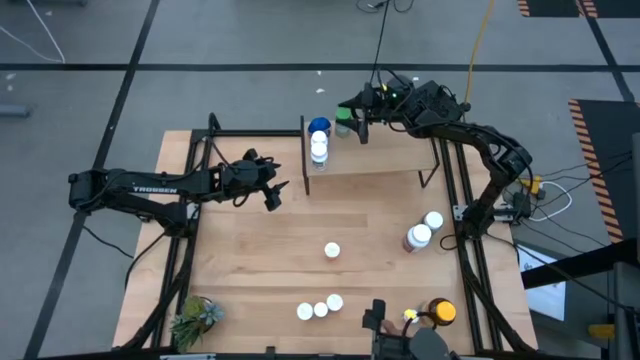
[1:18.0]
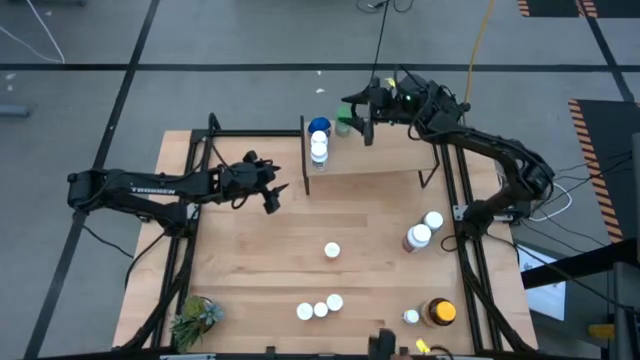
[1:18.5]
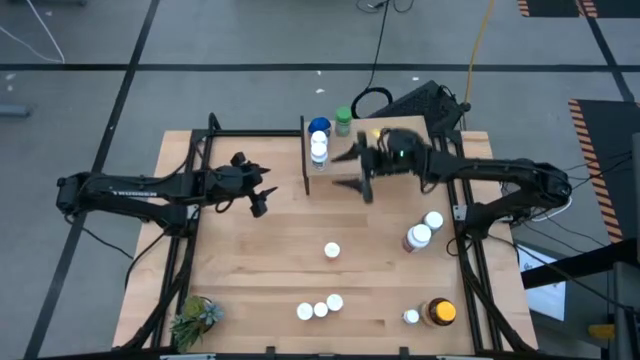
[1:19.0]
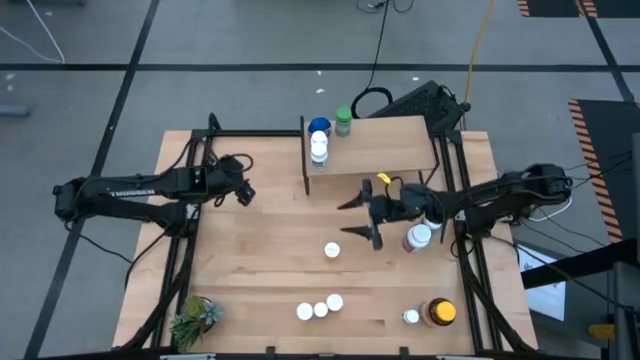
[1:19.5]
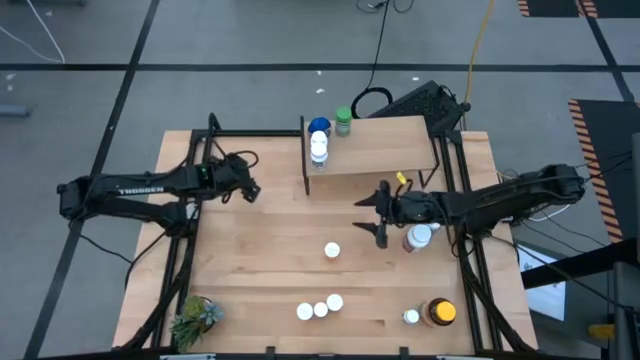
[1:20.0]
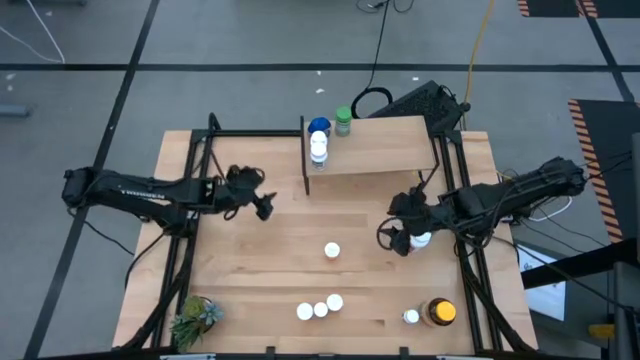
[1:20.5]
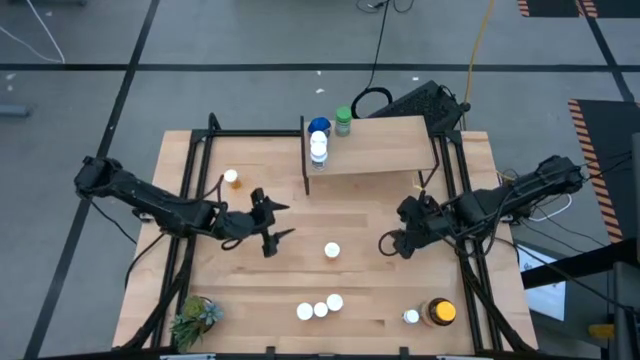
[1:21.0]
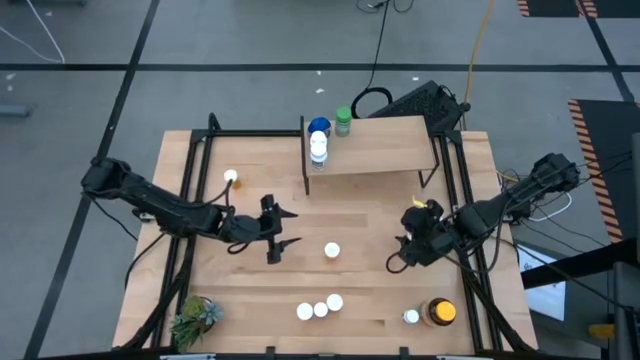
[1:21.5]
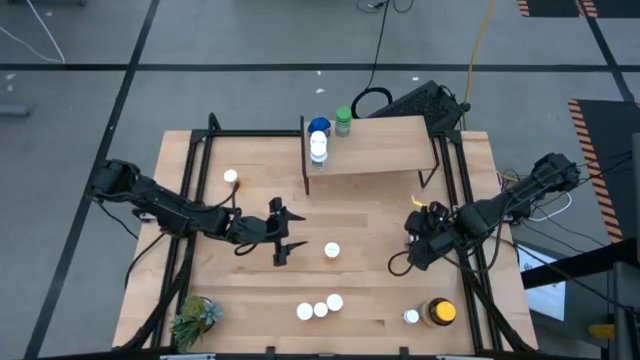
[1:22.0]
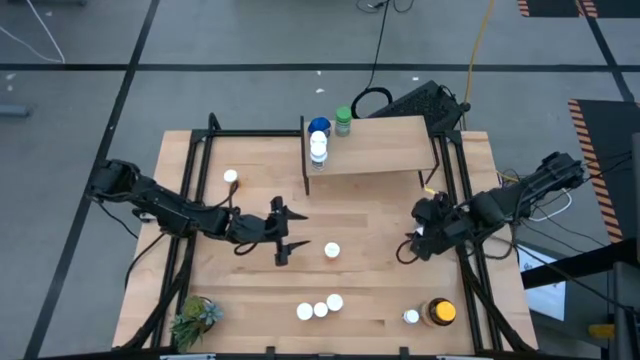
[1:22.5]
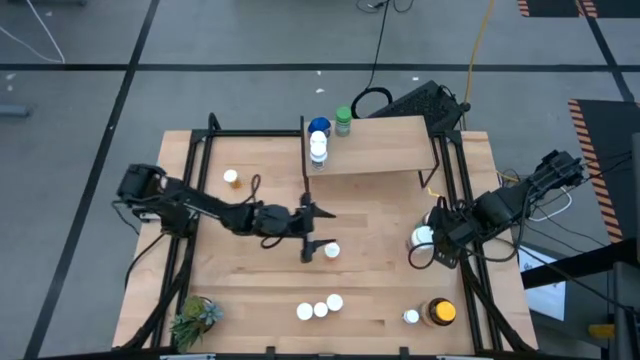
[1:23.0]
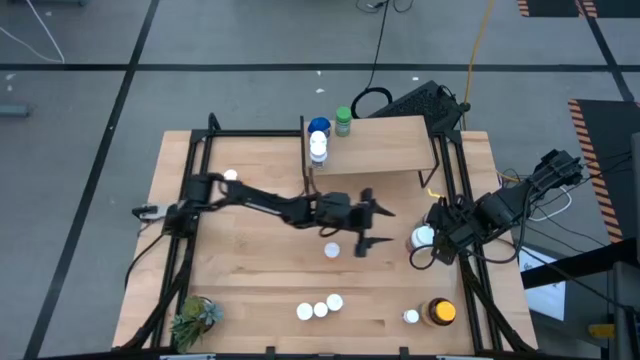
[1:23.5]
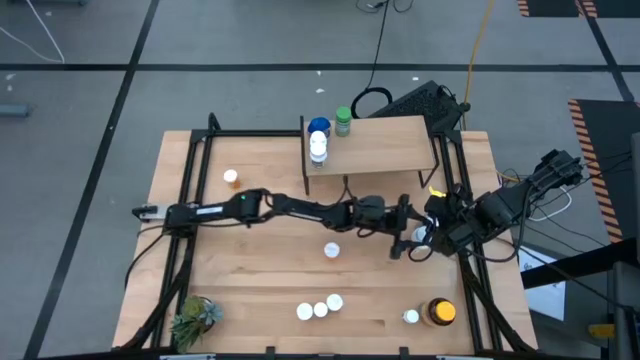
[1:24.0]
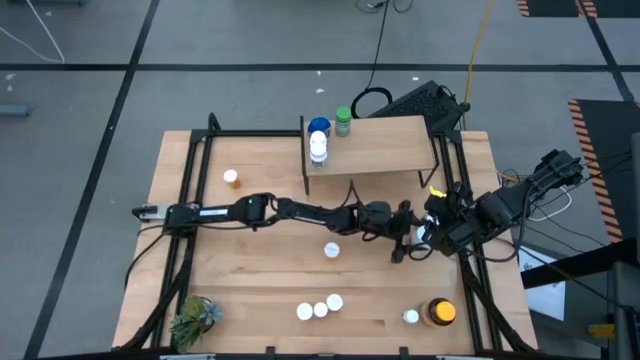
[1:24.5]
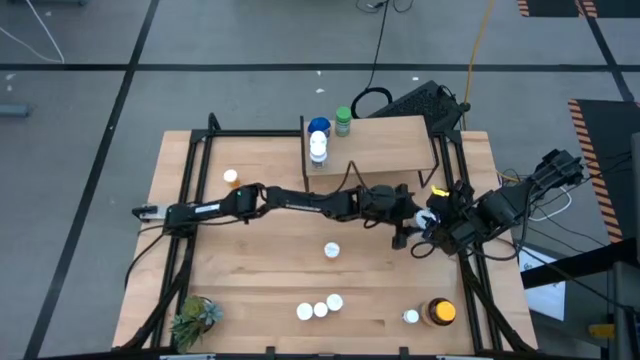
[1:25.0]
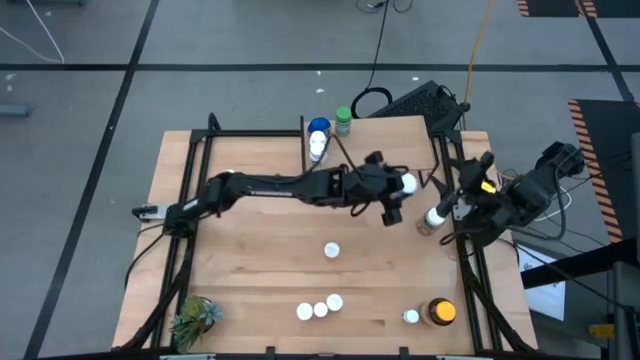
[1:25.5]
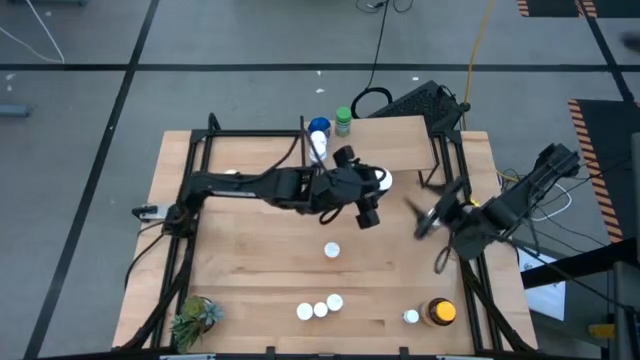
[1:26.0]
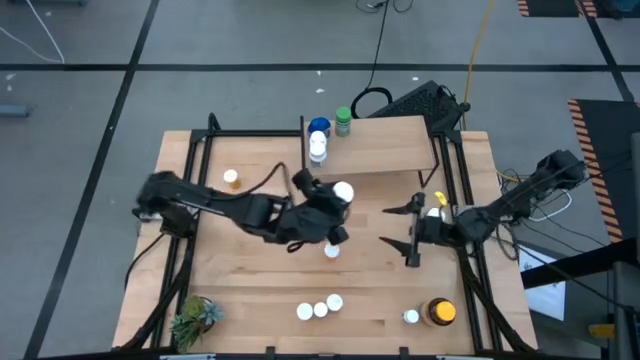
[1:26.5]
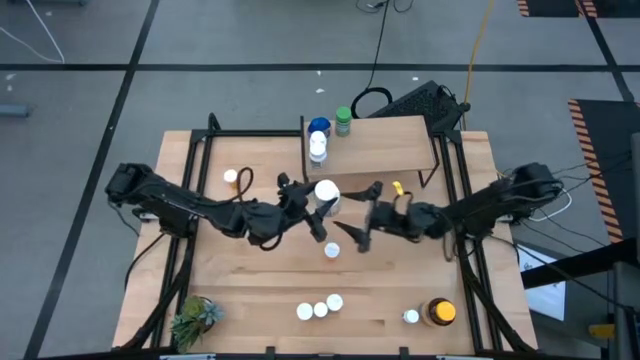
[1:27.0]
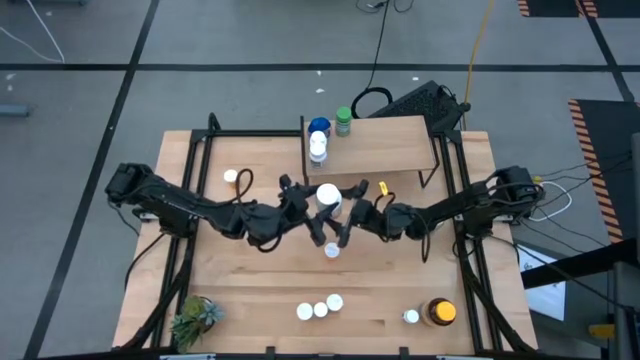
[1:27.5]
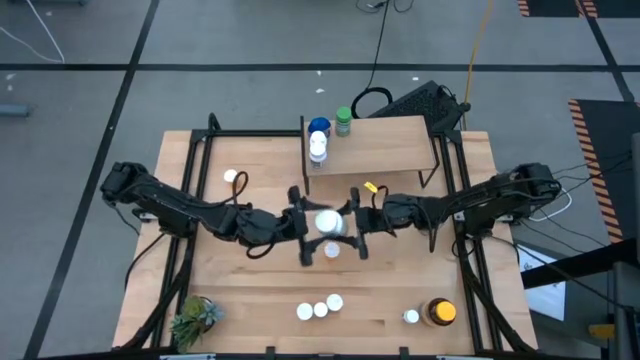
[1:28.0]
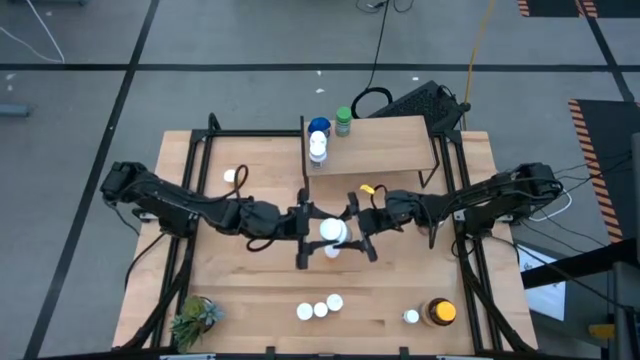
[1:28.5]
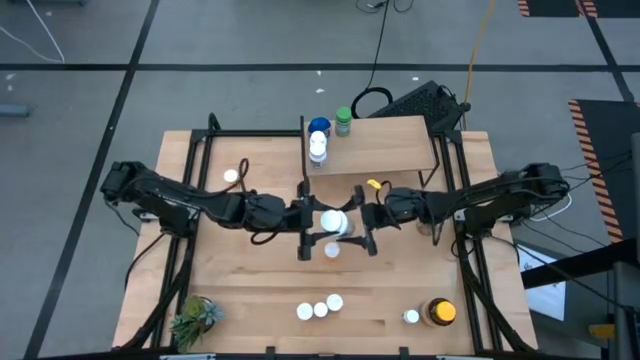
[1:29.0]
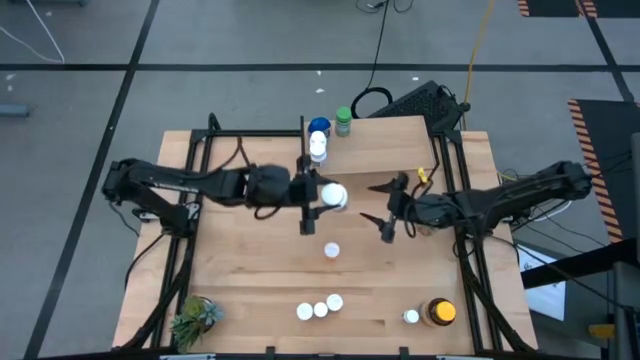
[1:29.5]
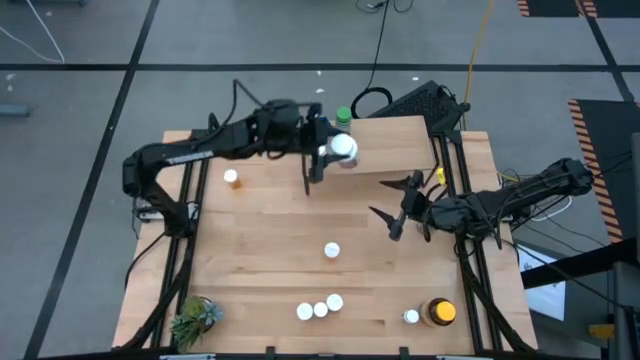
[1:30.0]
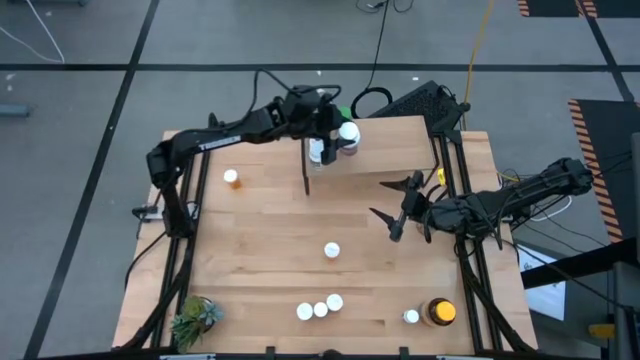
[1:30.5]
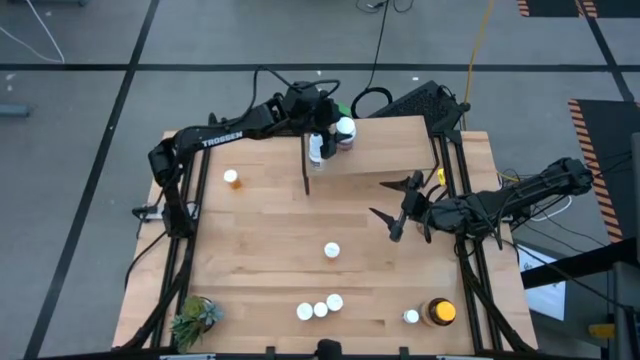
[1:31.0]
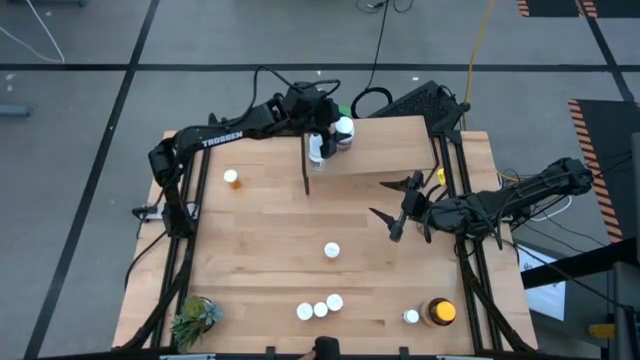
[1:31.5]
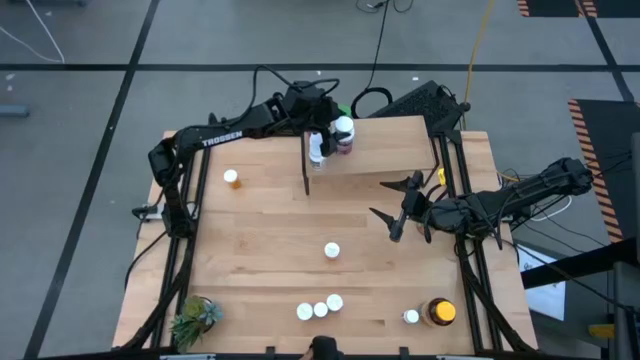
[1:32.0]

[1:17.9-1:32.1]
Task: Pick and place medicine bottles onto shelf by color
Put the white bottle on the shelf

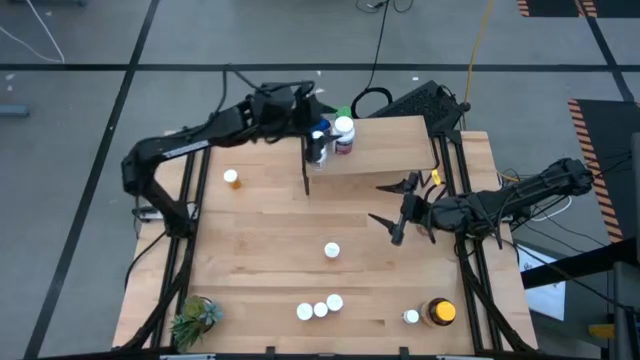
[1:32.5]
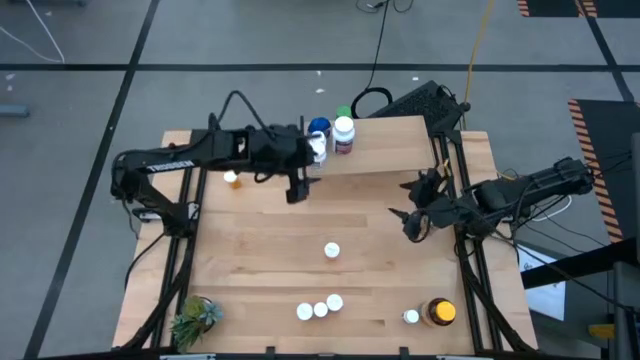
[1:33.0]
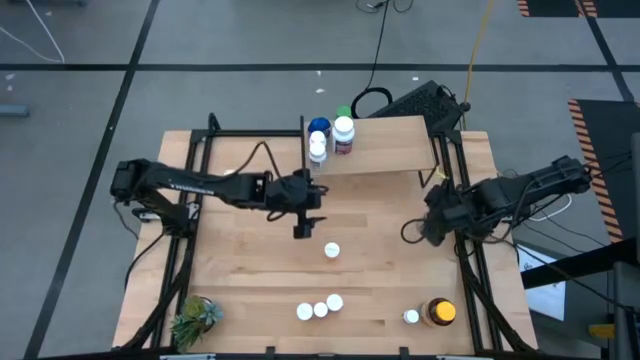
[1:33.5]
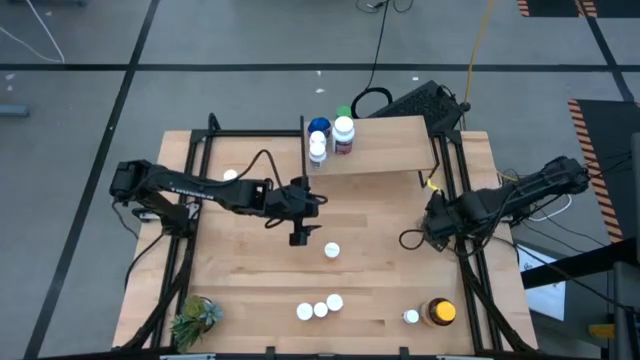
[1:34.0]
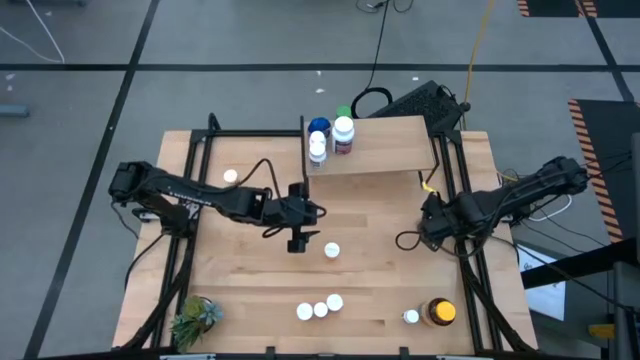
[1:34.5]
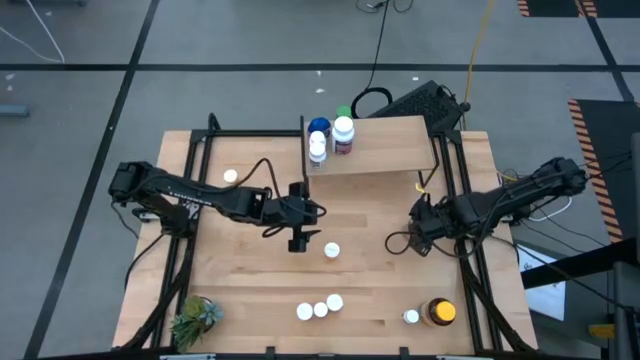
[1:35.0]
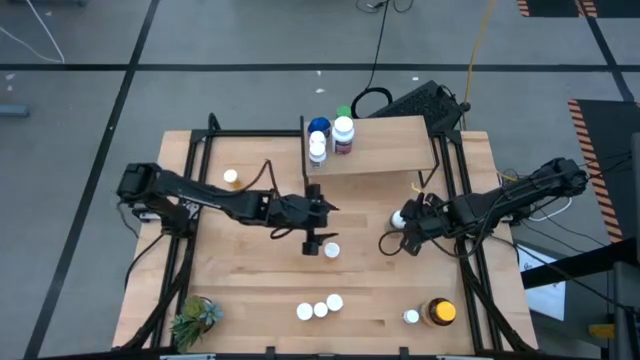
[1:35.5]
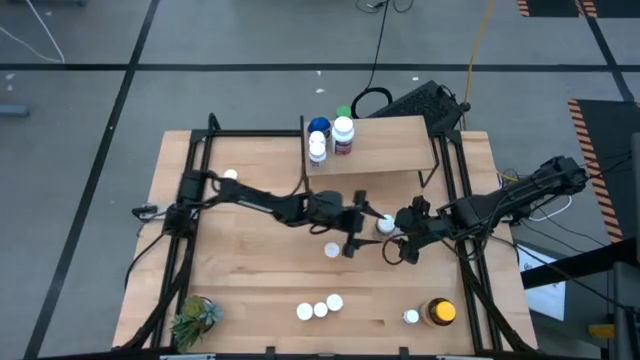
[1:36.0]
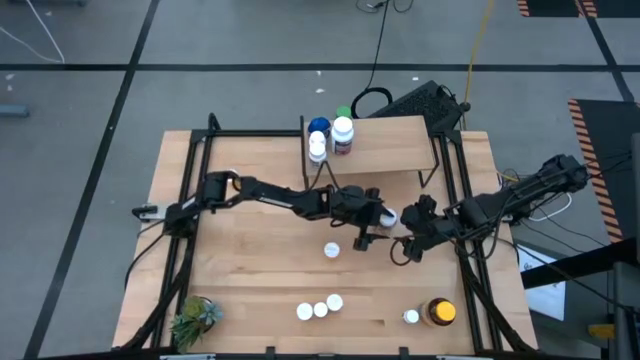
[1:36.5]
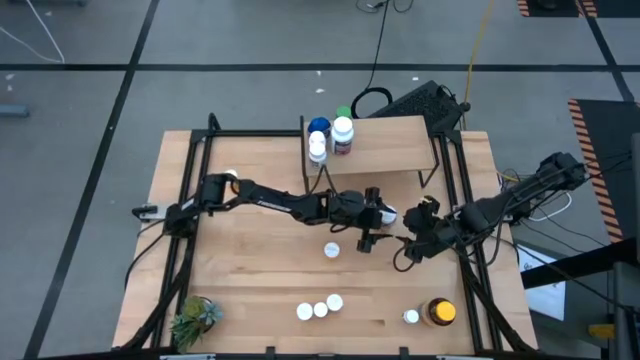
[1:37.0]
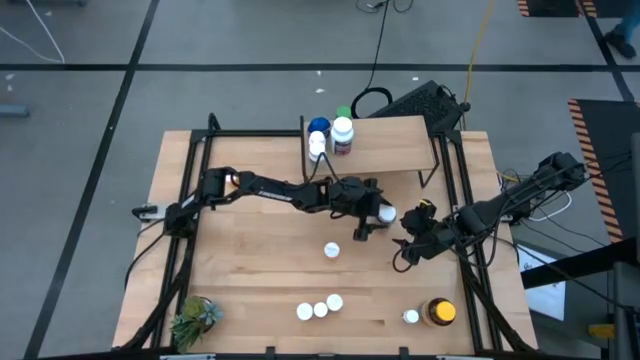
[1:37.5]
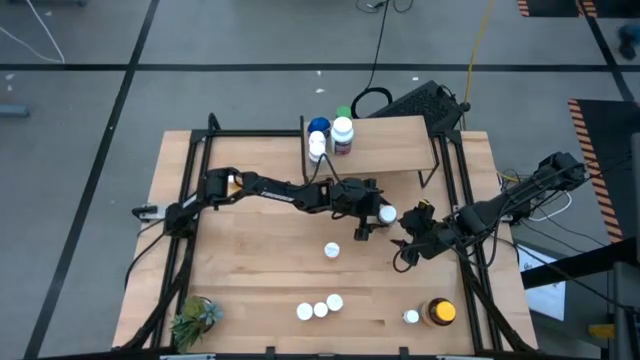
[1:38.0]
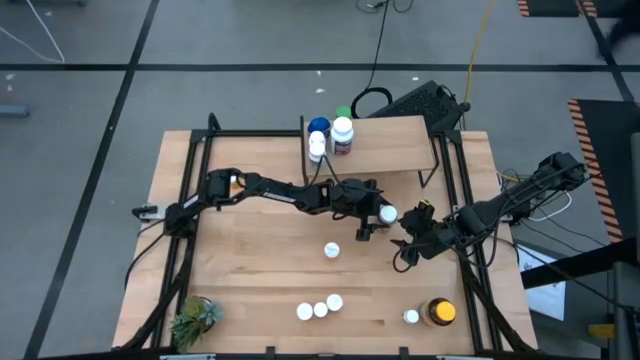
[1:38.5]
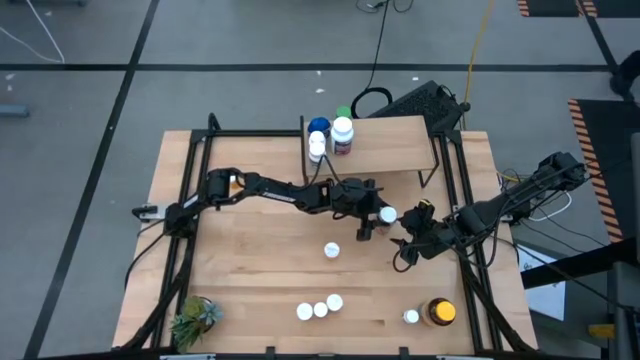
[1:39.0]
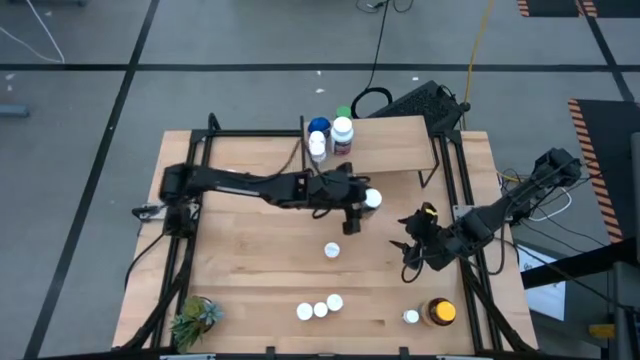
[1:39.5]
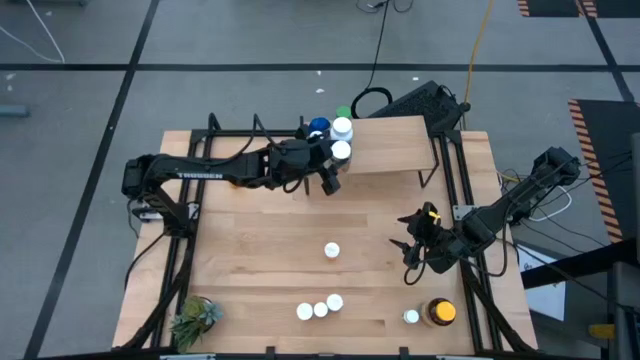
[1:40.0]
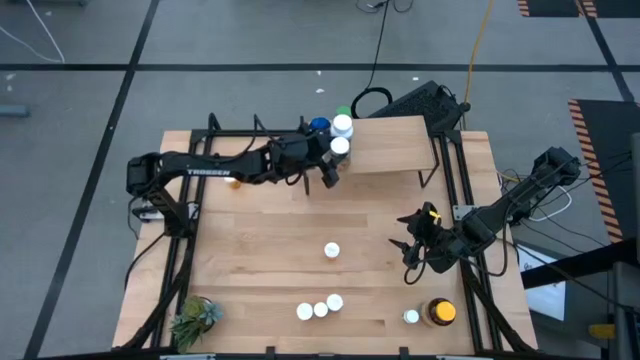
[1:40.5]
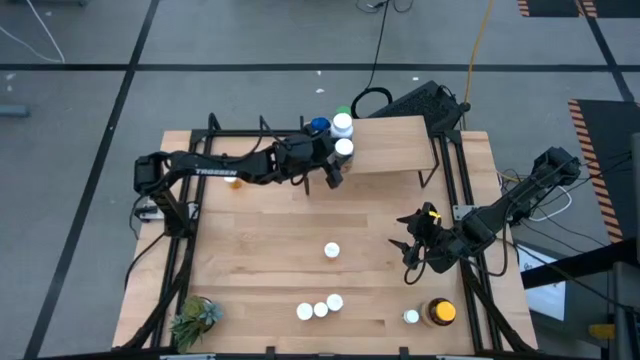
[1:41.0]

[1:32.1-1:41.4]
Put the transparent bottle on the shelf
